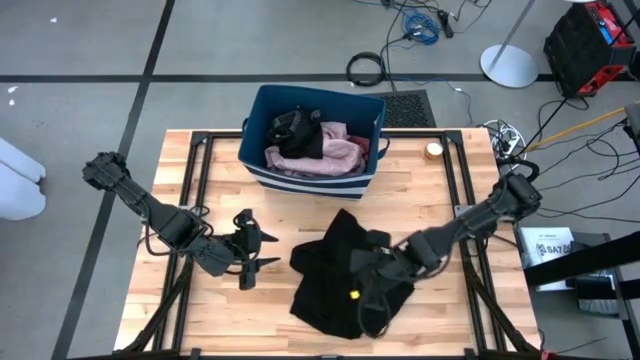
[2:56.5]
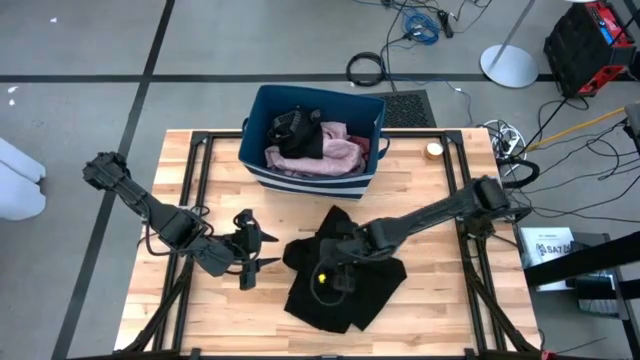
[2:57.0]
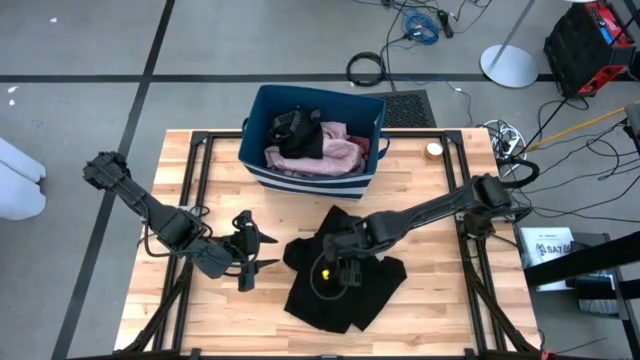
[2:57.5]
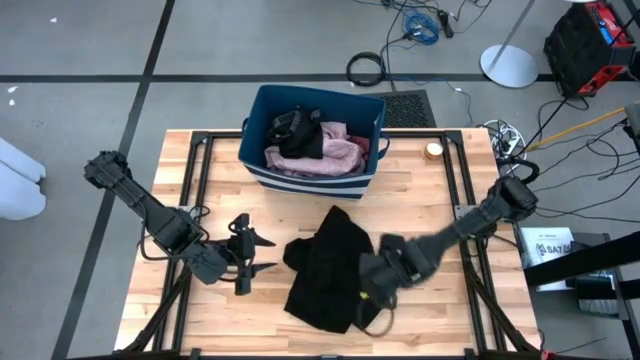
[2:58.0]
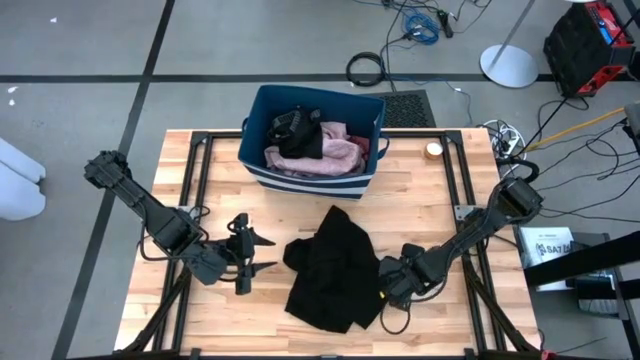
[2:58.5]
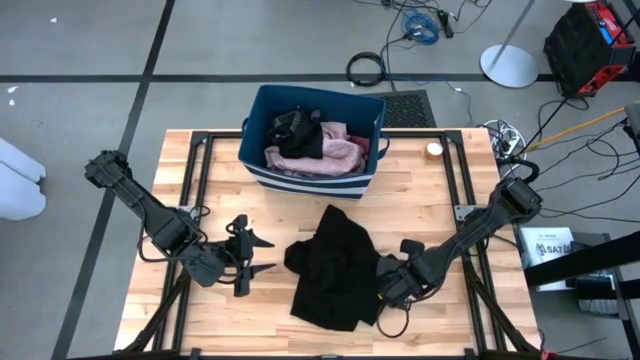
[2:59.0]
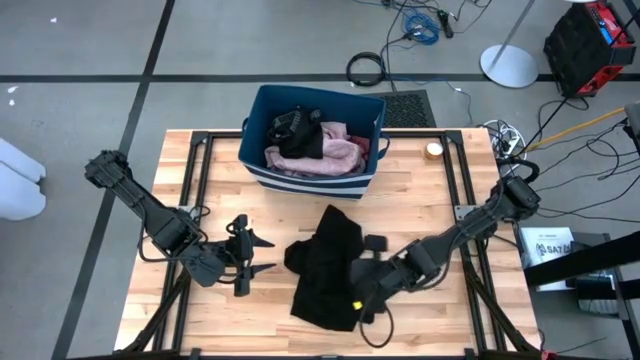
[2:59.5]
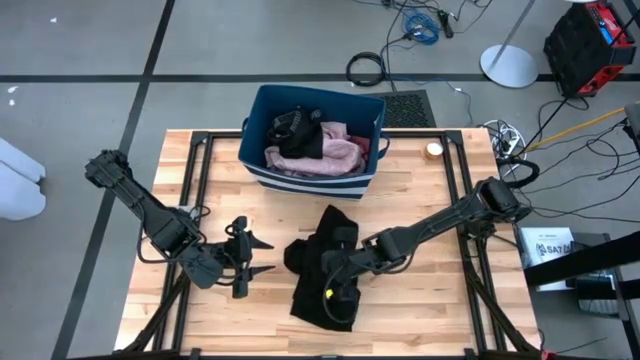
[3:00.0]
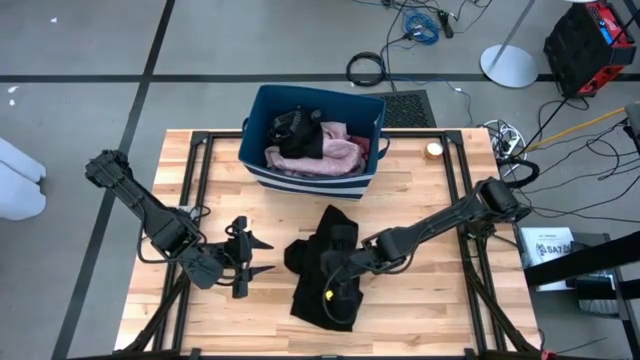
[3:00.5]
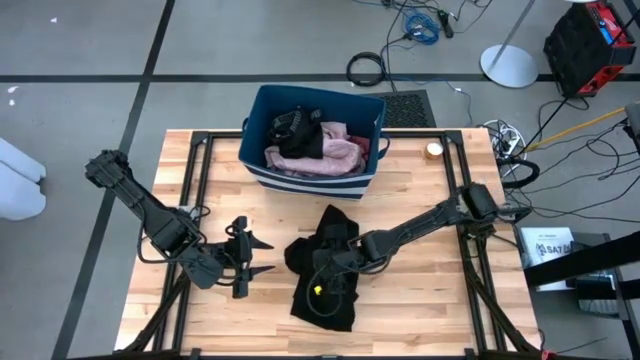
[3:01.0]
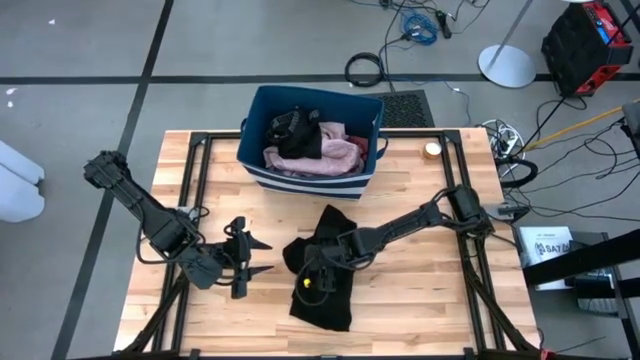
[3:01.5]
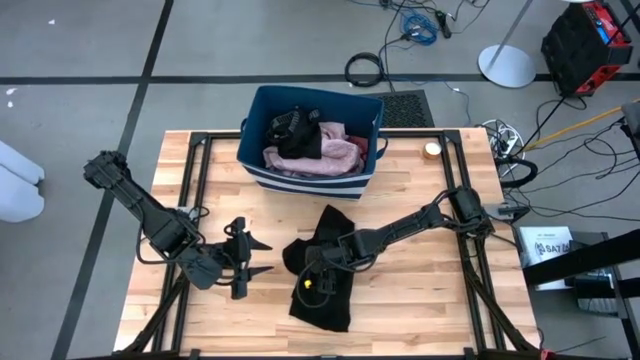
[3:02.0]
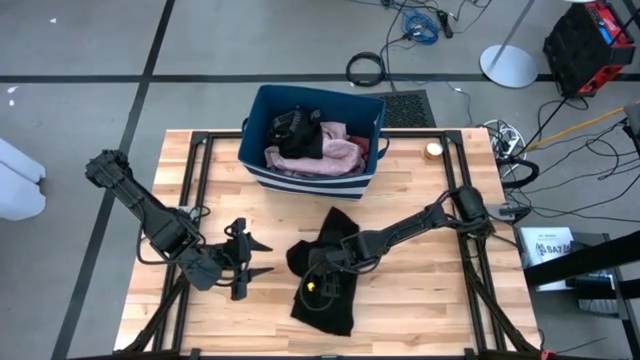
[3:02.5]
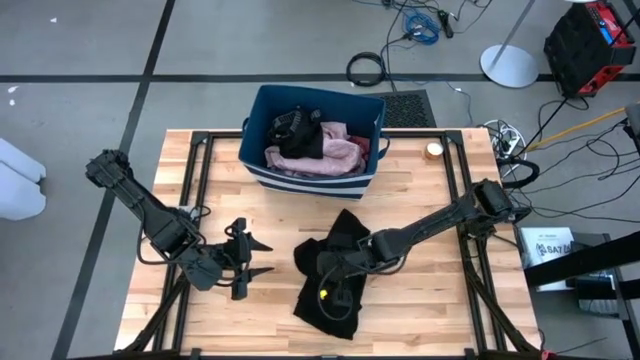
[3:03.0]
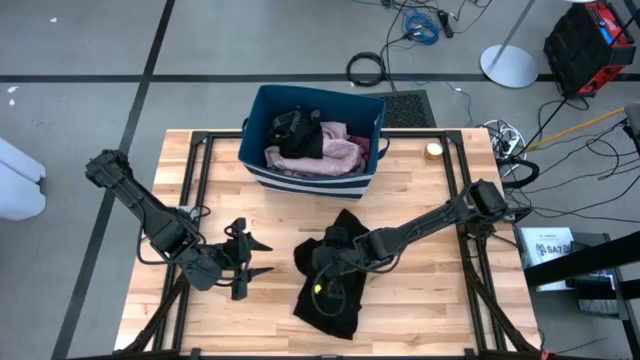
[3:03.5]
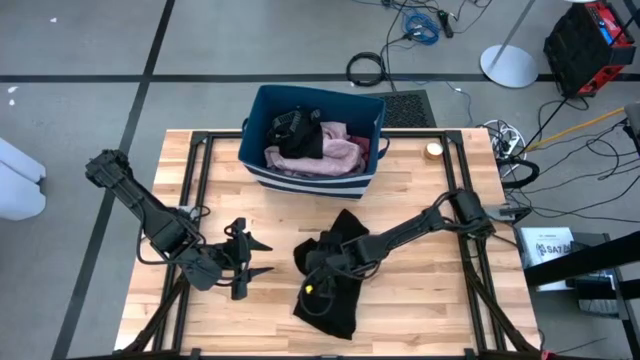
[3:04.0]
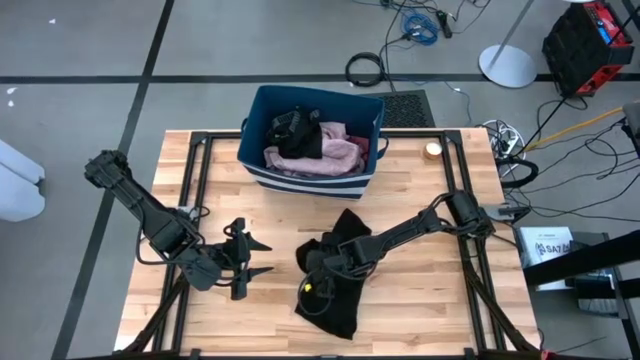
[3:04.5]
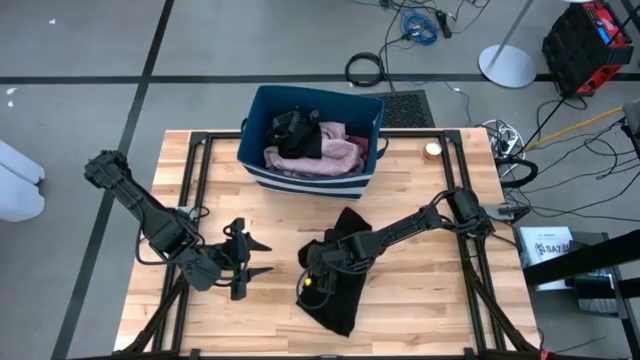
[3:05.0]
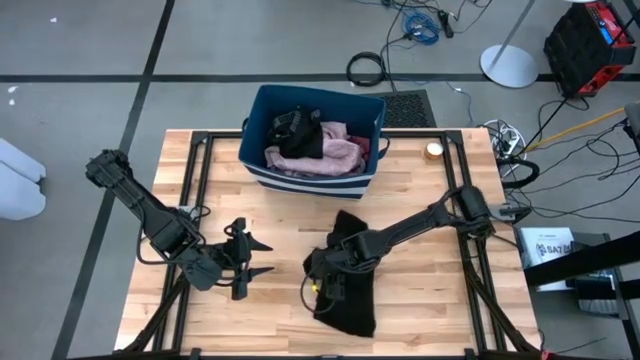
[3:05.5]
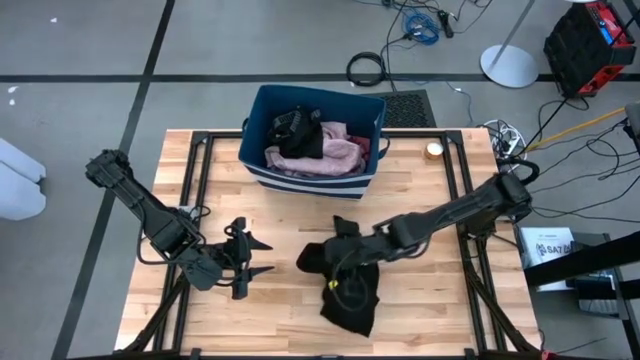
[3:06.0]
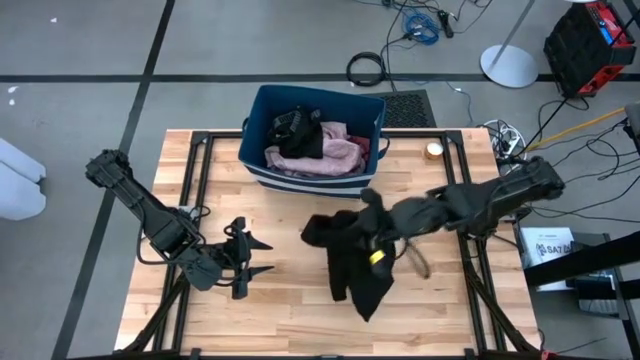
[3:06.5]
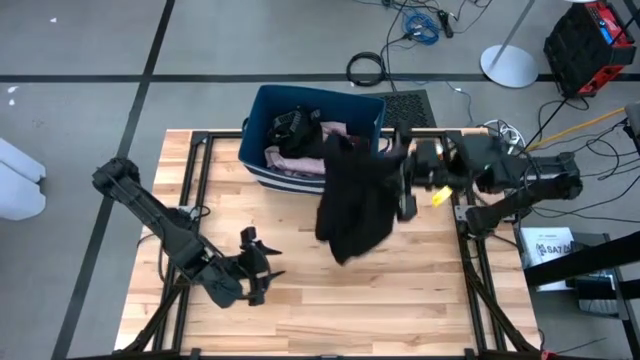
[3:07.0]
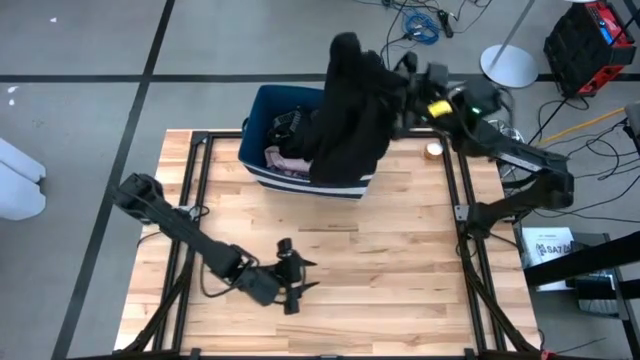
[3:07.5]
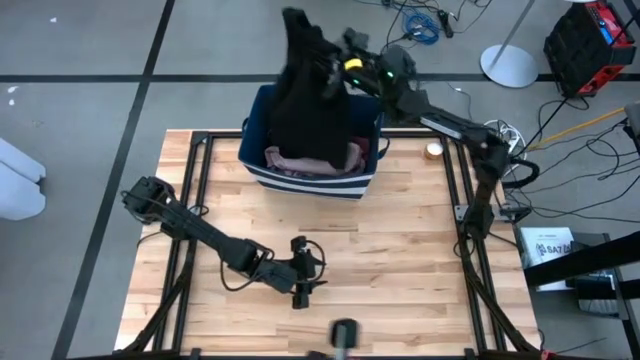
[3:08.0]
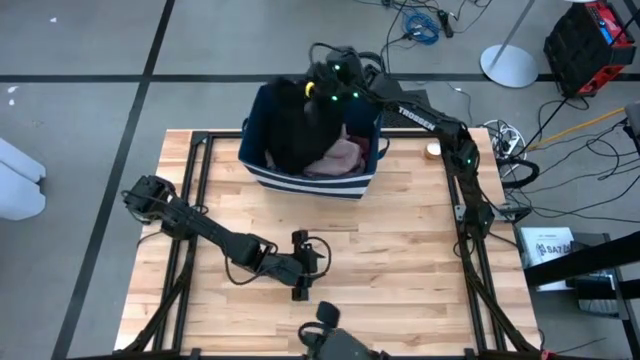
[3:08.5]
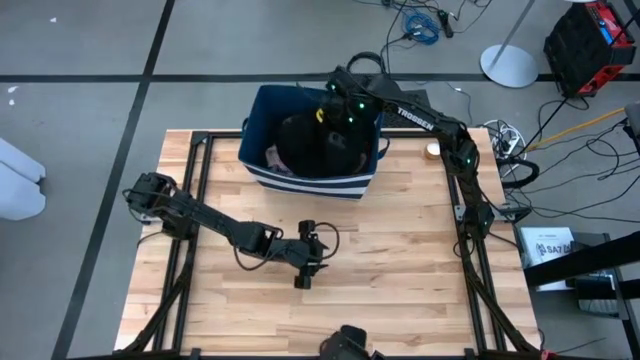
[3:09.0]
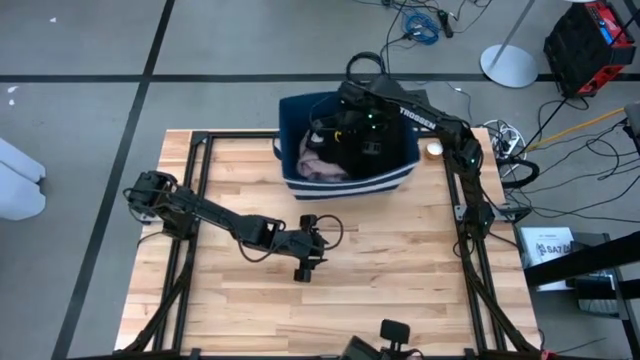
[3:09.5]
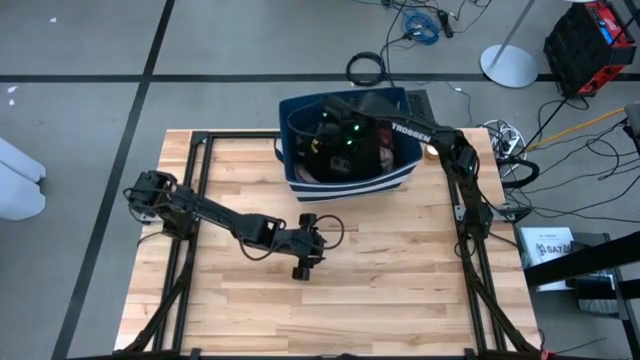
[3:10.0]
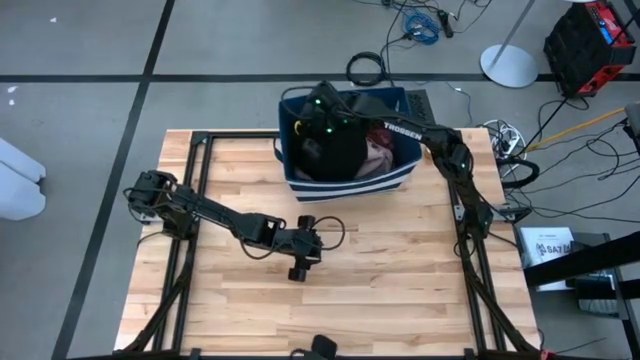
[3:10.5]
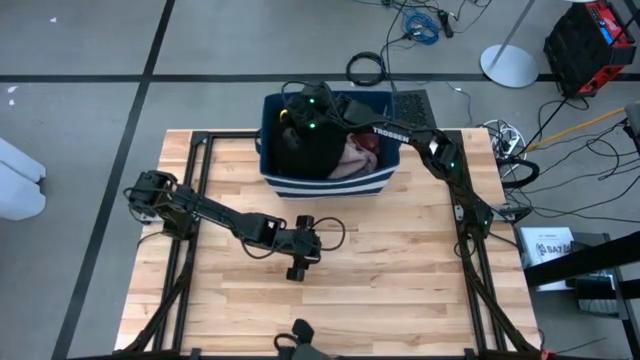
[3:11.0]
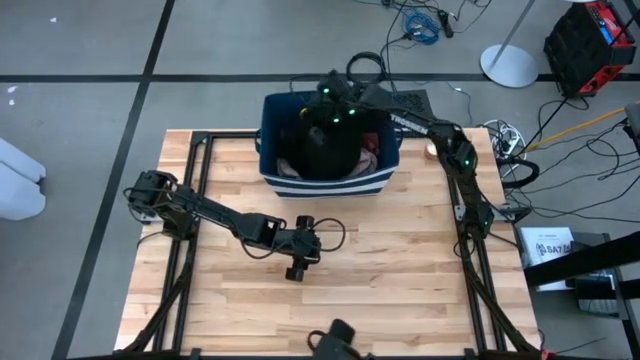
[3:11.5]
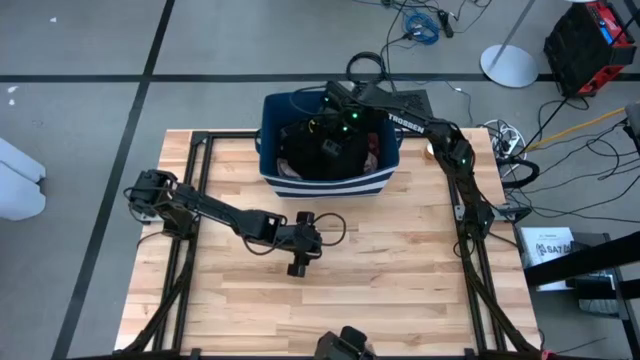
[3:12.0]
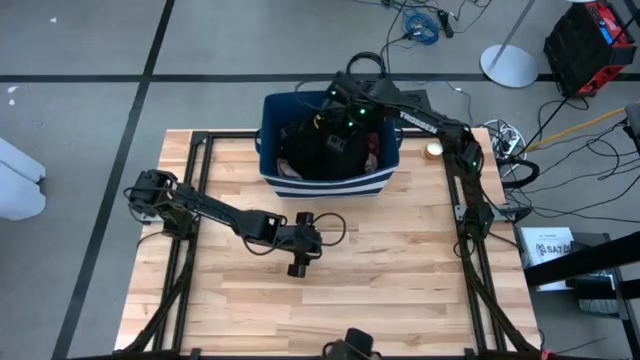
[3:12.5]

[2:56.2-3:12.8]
Task: Sort clothes
Put the black hoodie into the blue laundry organizer

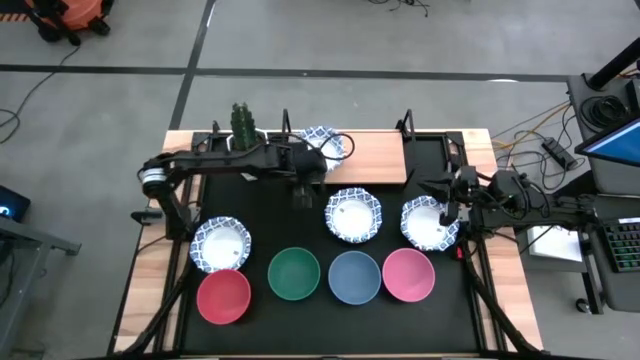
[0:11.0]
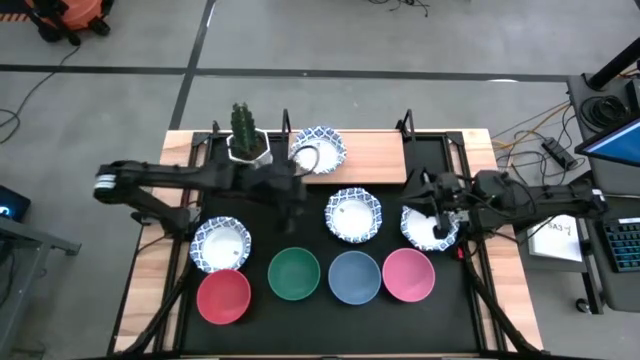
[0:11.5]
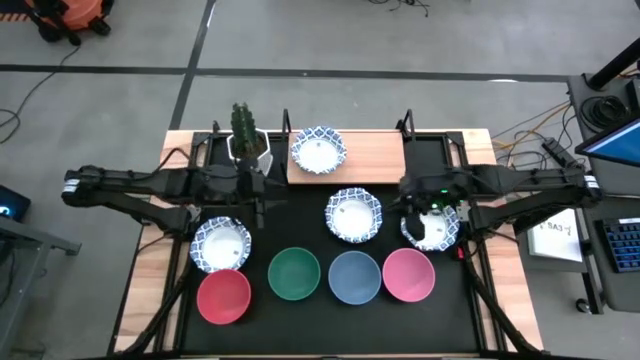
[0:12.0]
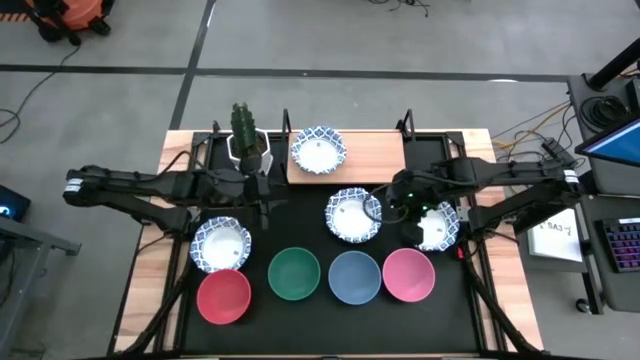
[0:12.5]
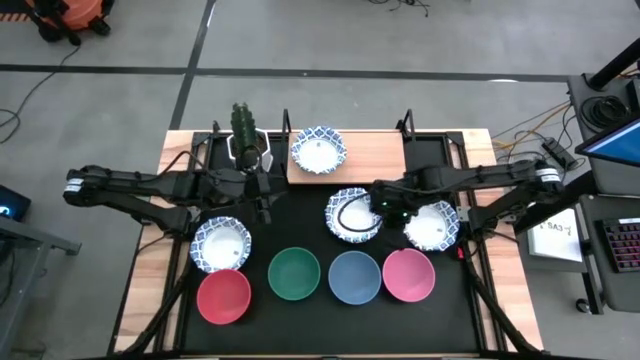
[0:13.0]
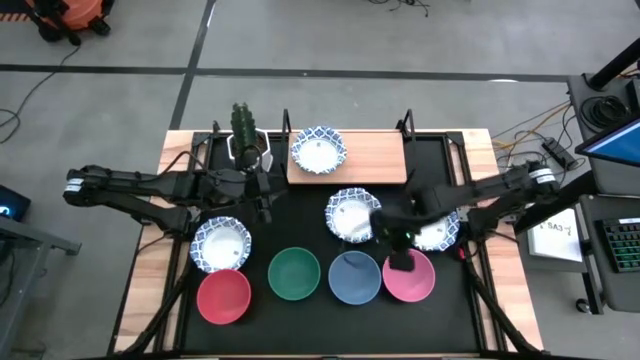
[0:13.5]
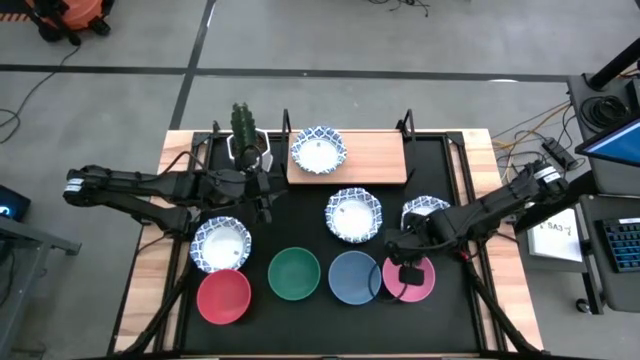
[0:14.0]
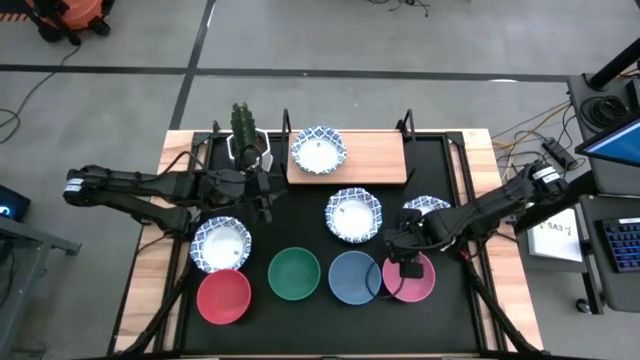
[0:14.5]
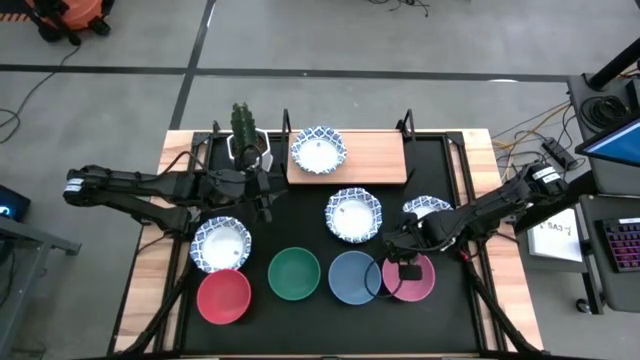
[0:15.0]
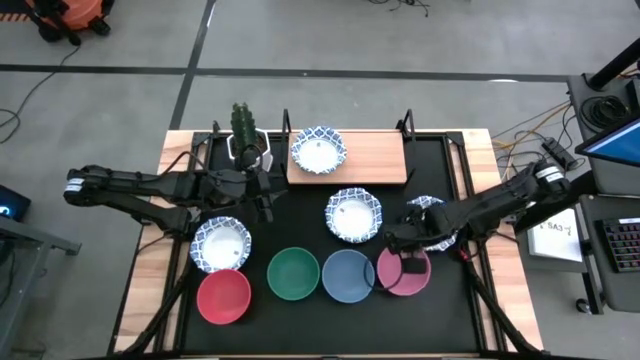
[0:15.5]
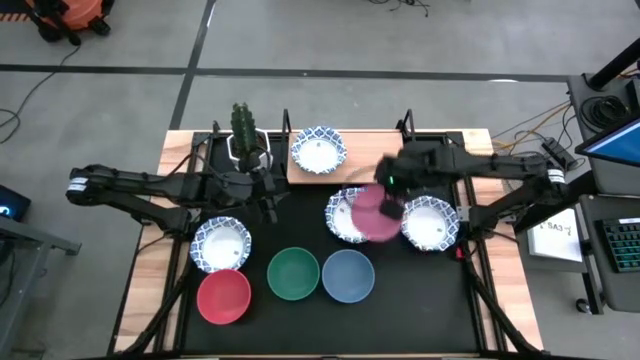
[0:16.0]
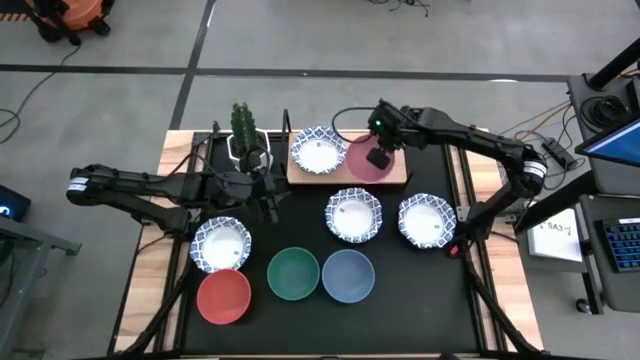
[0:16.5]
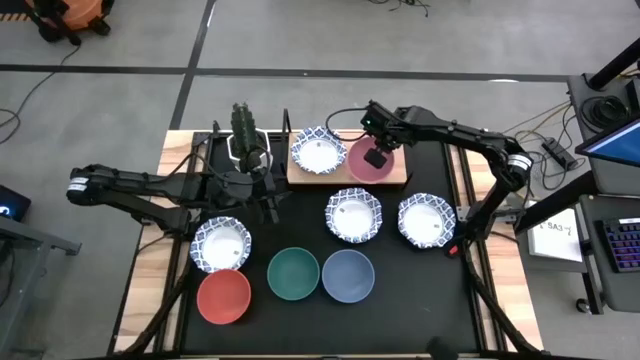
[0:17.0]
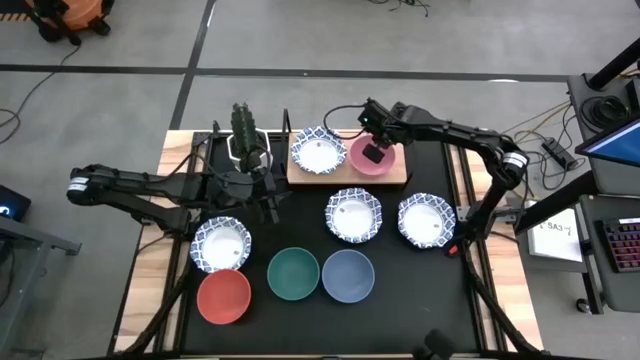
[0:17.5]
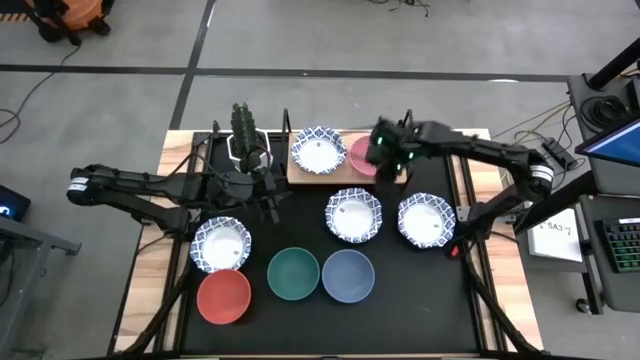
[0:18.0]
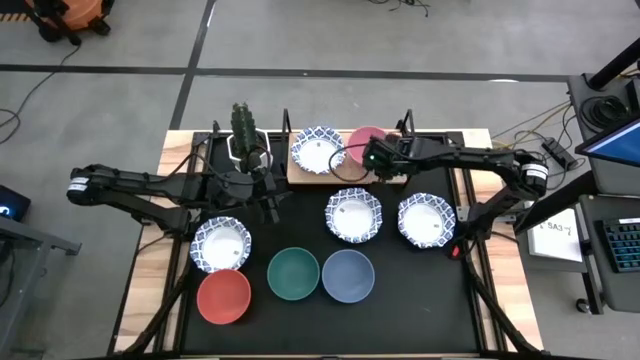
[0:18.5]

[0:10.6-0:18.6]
Task: Place and stack bowls onto a shelf
Put the pink bowl on the shelf
